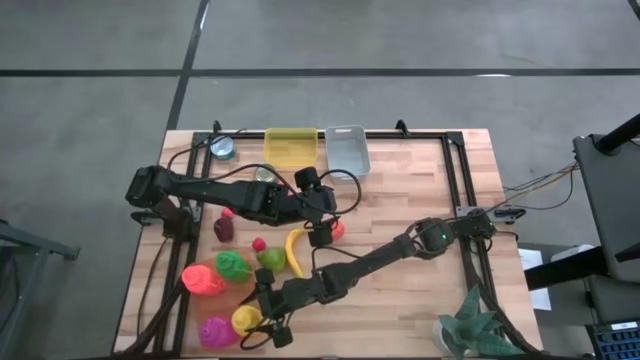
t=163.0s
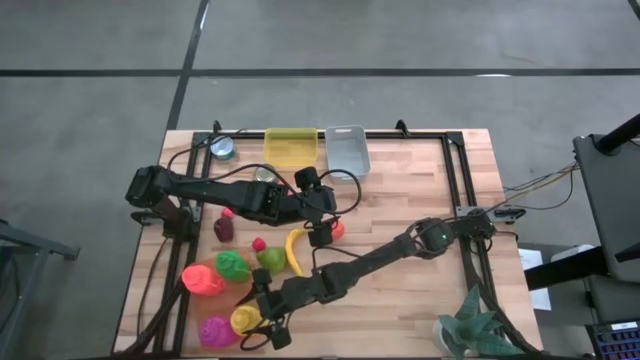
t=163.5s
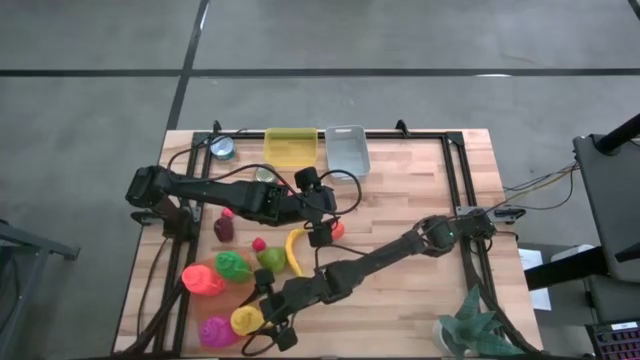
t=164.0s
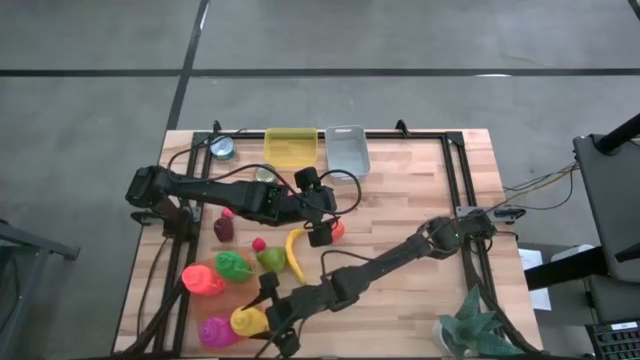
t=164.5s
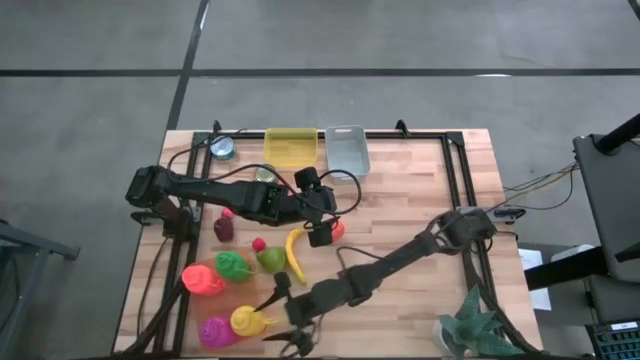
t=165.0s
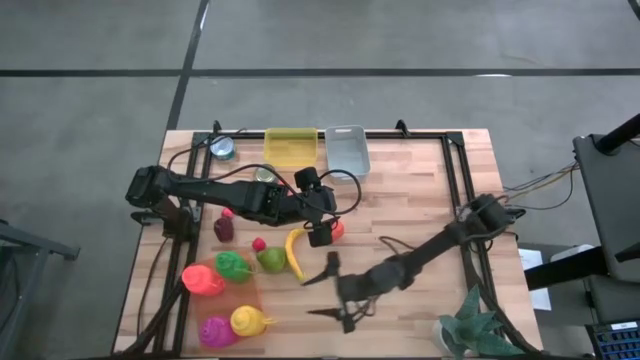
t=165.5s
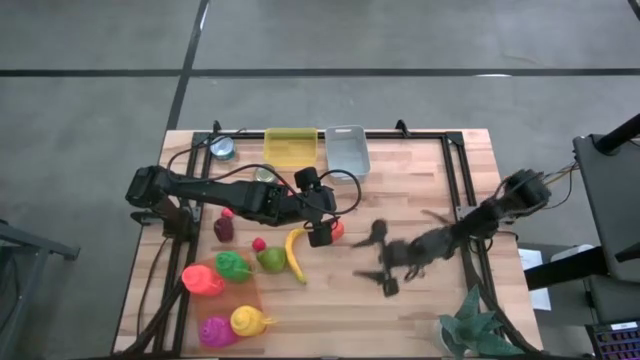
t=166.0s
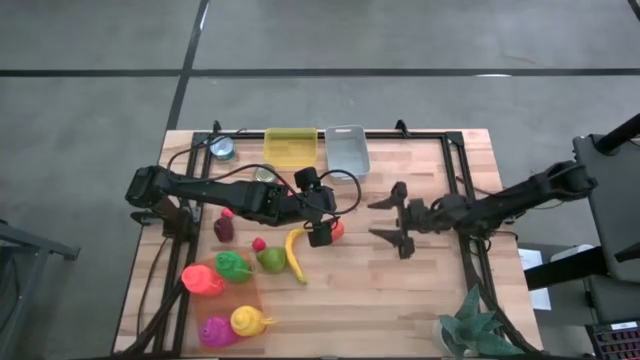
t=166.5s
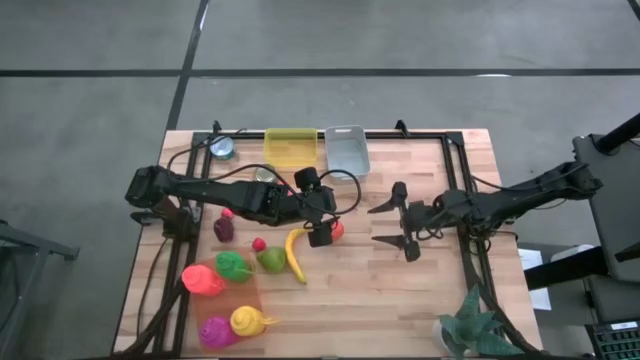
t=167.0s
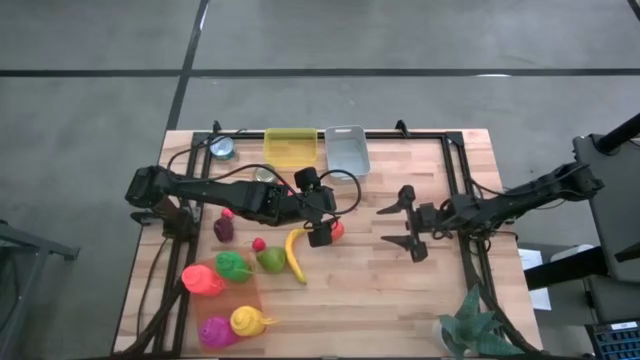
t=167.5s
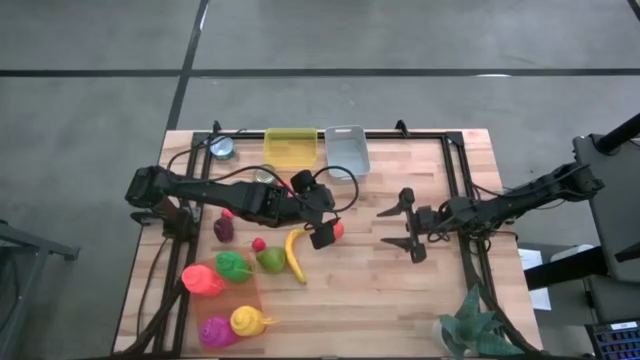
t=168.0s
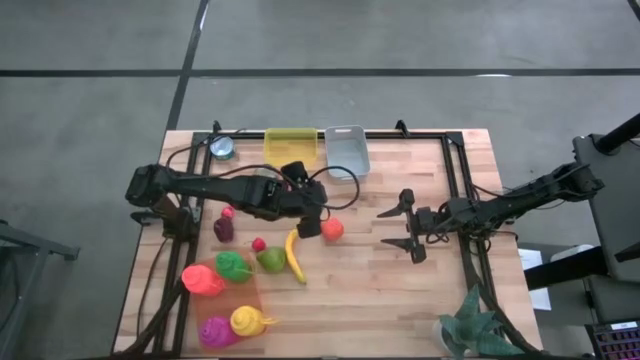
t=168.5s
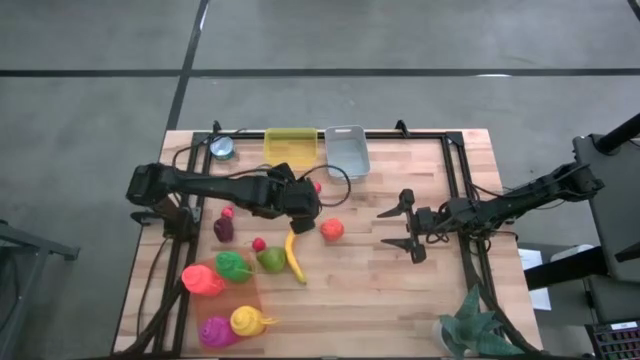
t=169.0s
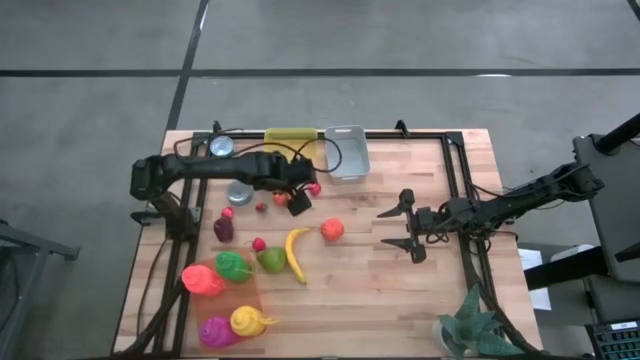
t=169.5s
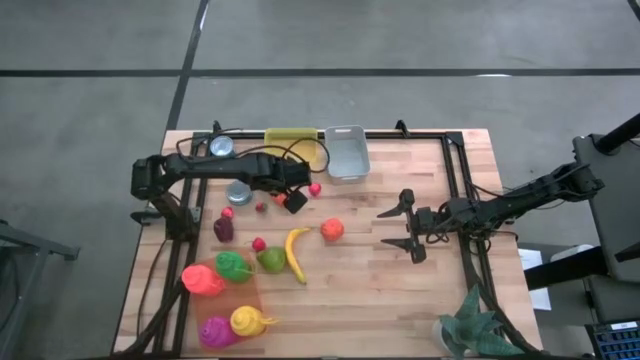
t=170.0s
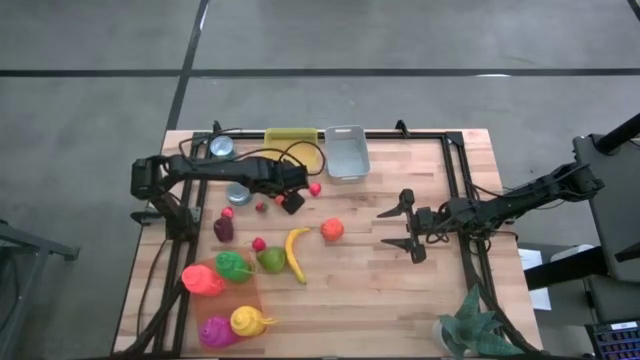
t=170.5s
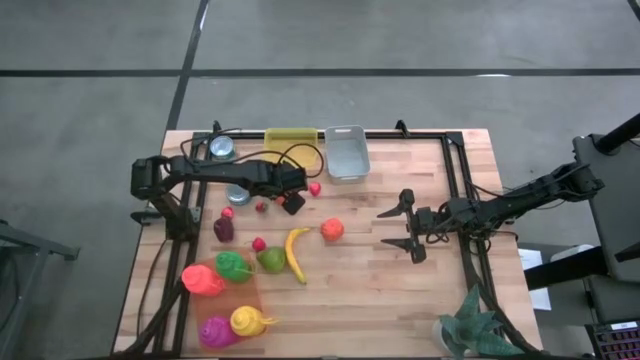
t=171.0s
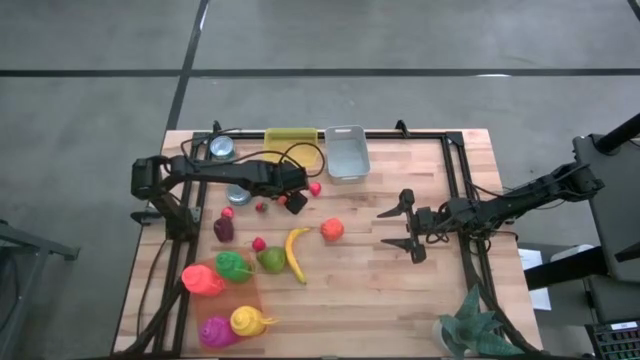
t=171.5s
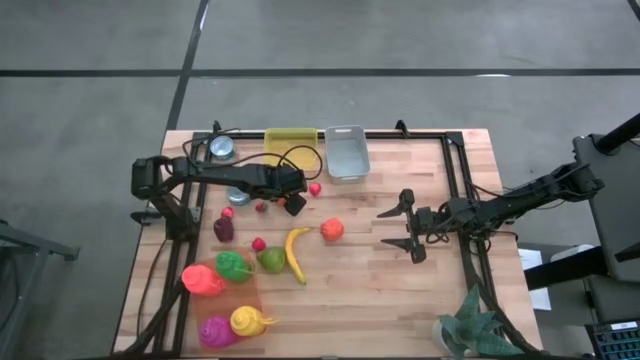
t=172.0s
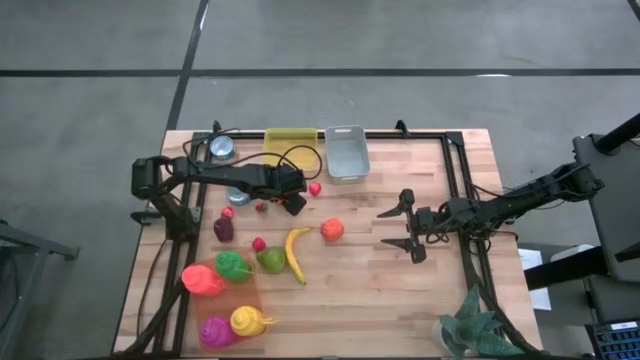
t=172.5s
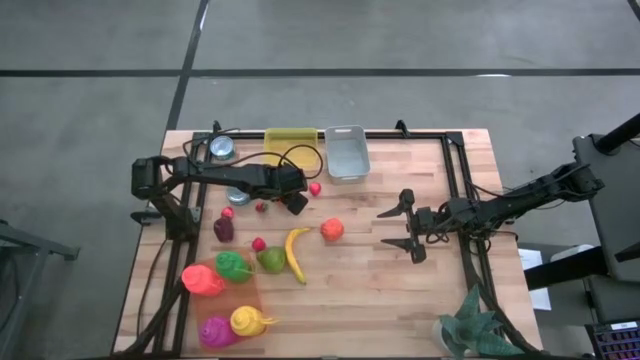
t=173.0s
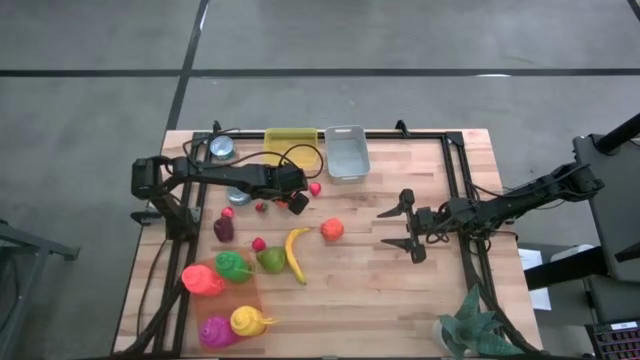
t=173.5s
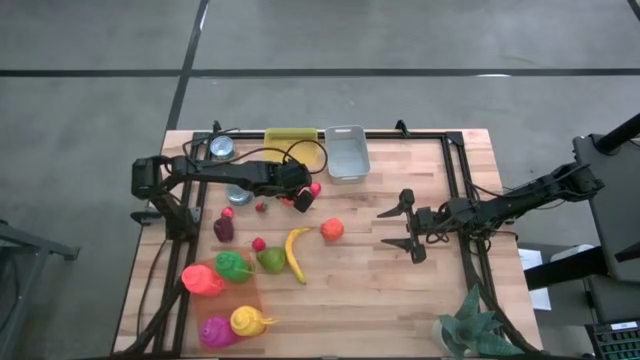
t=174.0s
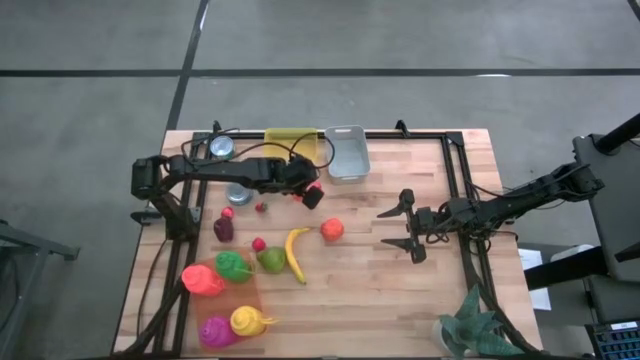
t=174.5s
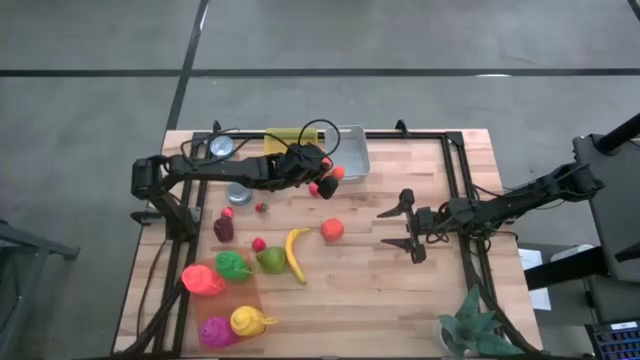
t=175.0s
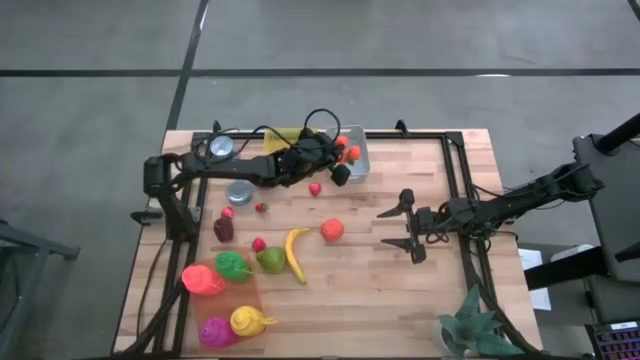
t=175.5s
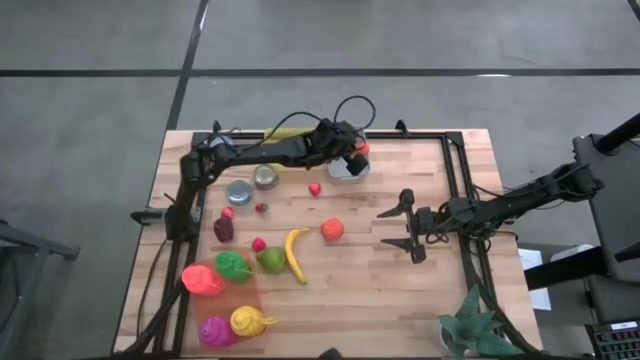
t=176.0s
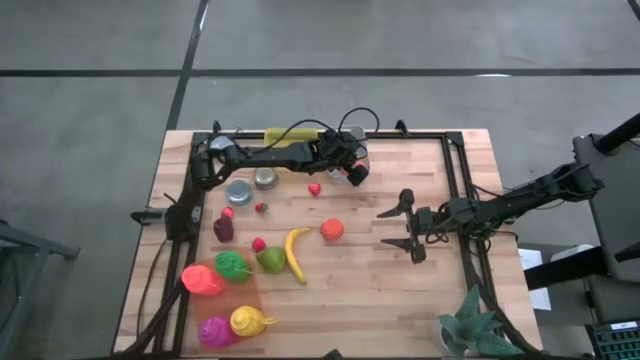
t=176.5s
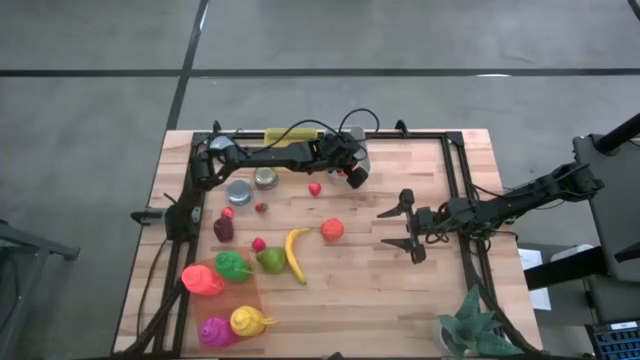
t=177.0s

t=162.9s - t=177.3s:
Task: Pick & Place Food Item
Put the tangerines into the gray bin

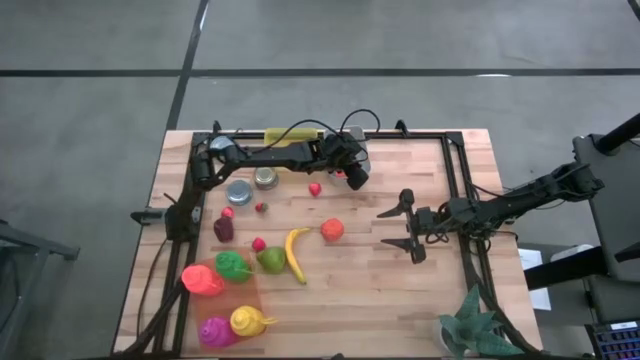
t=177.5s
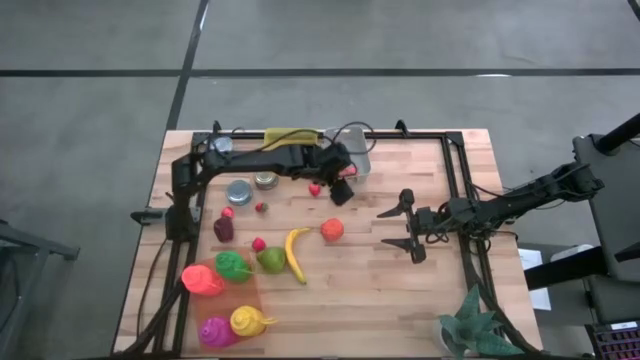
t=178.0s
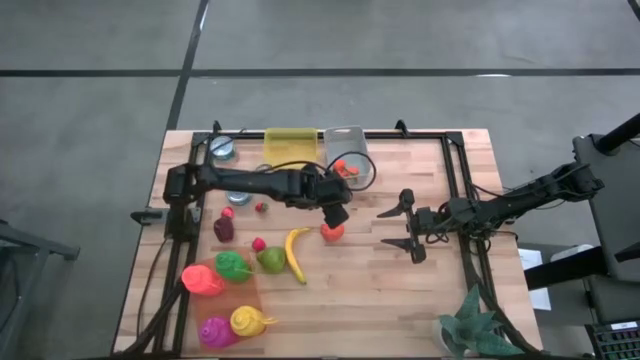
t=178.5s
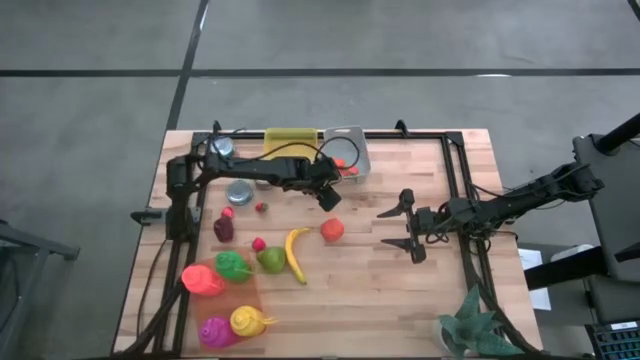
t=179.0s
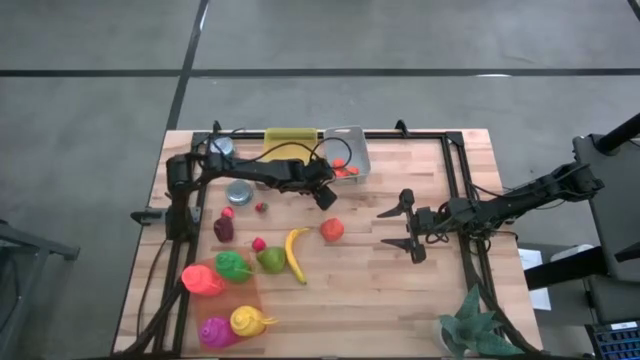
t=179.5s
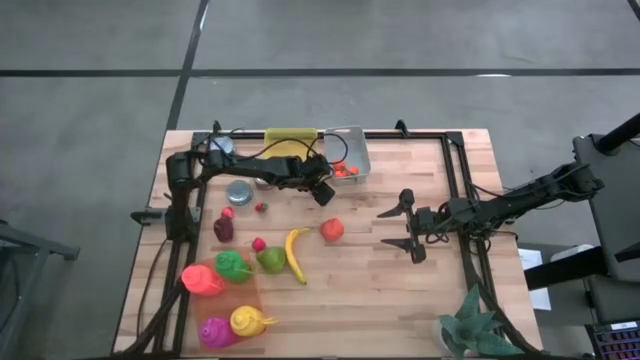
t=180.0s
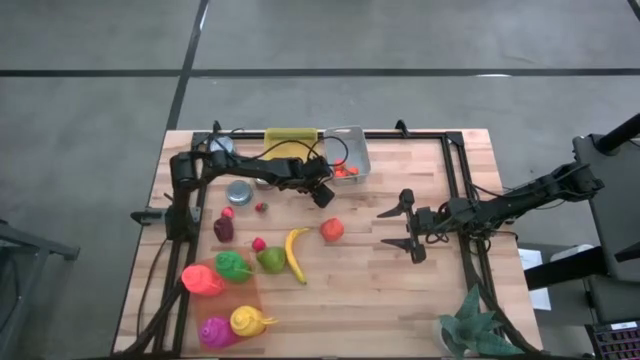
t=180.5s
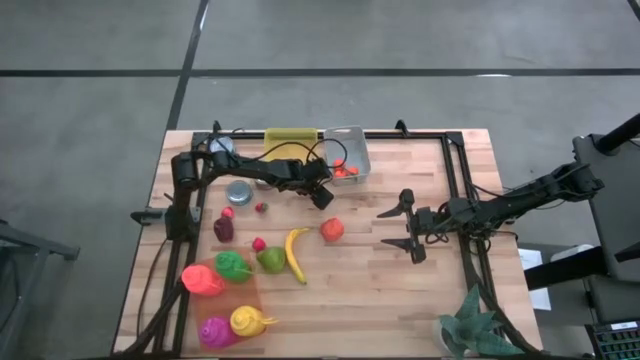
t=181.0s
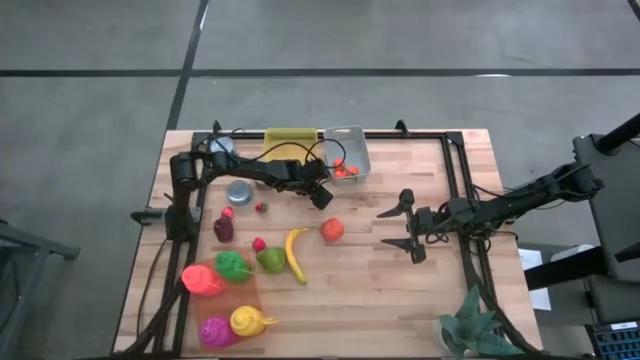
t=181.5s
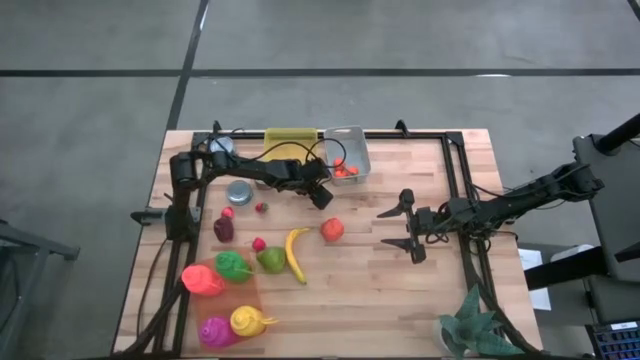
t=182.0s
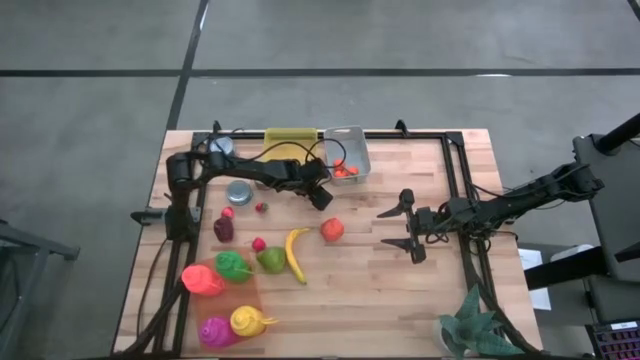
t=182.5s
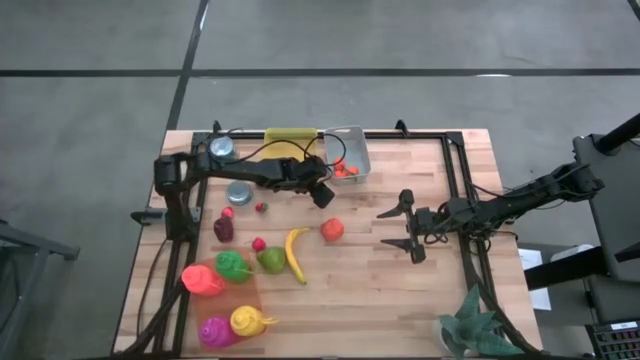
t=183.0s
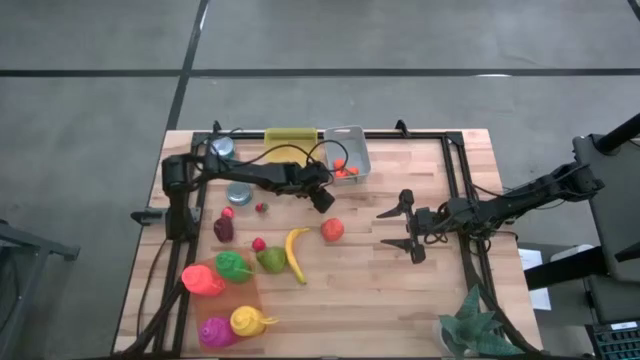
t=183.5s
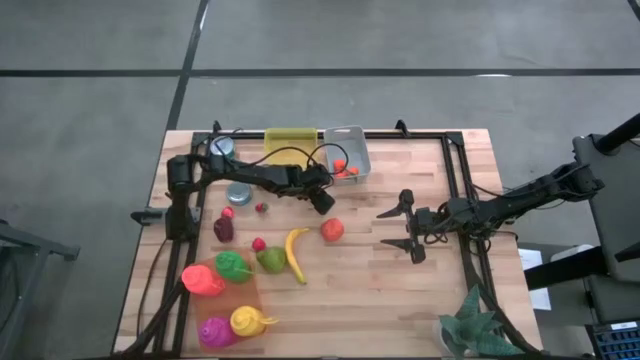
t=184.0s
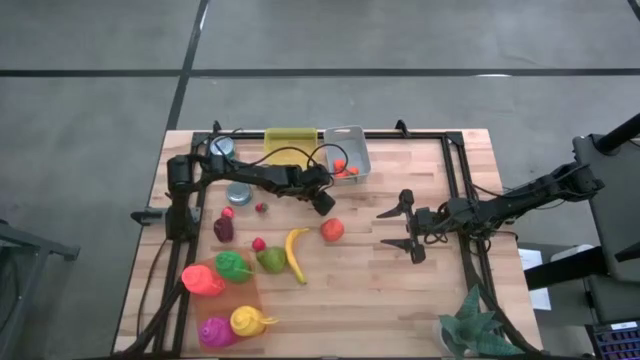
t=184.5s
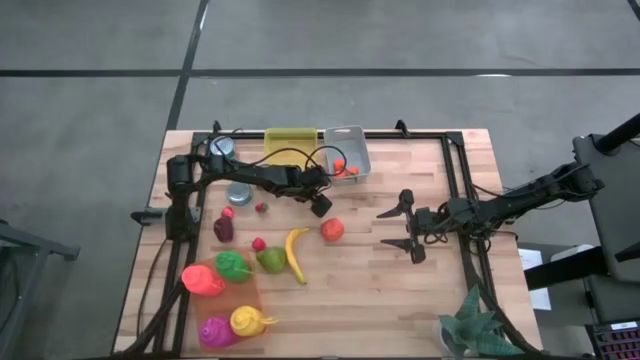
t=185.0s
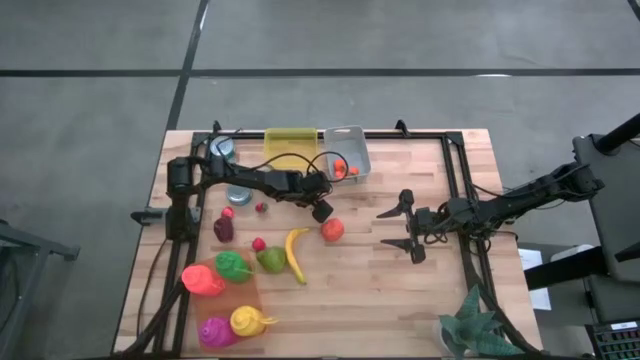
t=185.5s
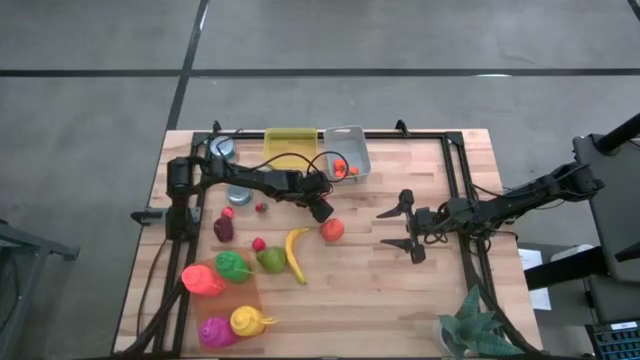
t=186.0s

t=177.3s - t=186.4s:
Put the red strawberry into the gray bin
